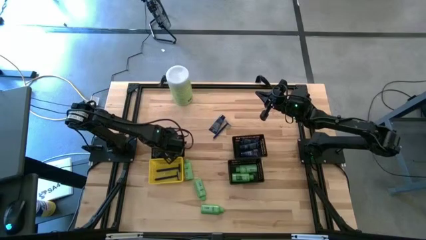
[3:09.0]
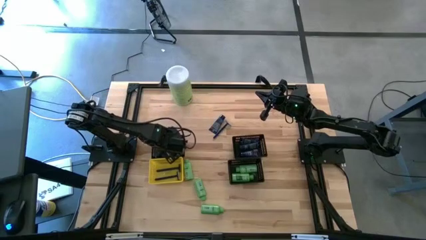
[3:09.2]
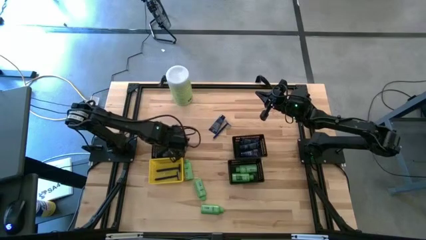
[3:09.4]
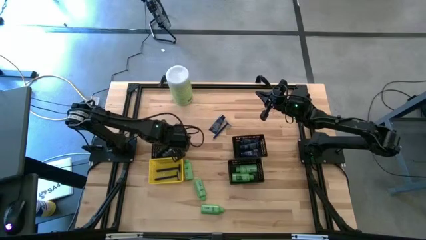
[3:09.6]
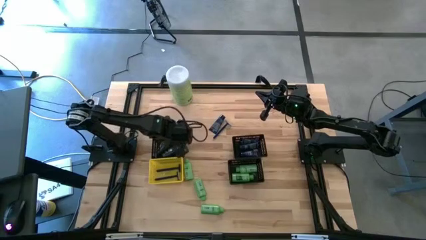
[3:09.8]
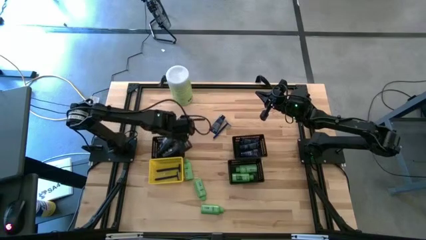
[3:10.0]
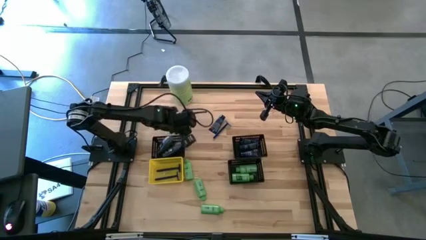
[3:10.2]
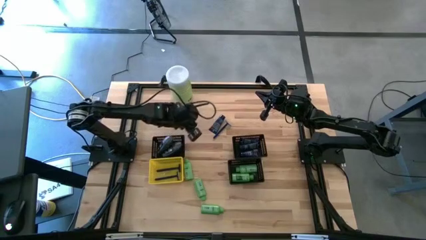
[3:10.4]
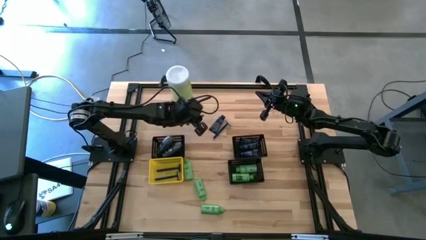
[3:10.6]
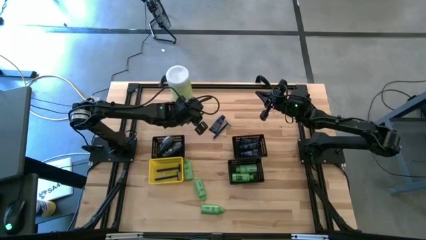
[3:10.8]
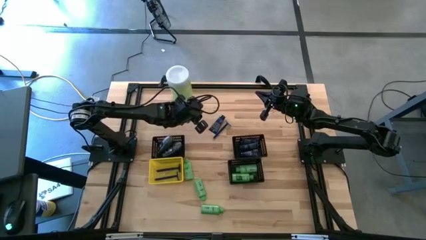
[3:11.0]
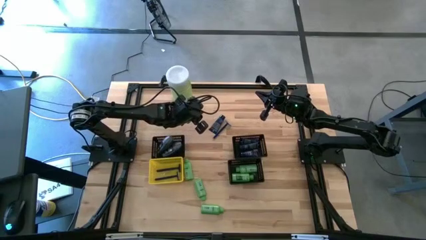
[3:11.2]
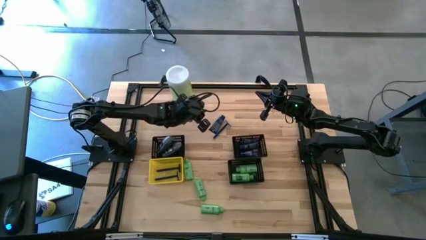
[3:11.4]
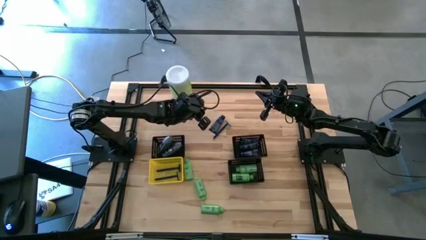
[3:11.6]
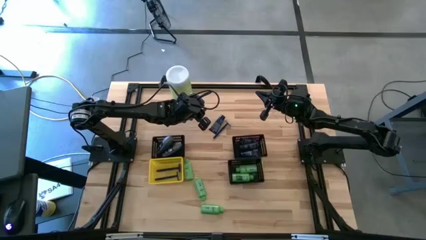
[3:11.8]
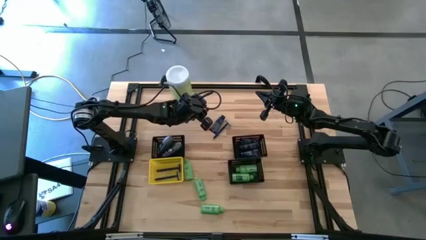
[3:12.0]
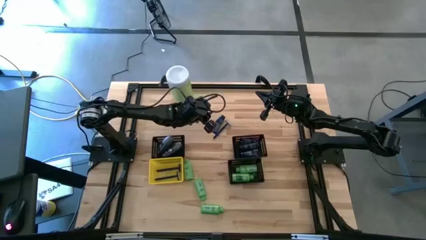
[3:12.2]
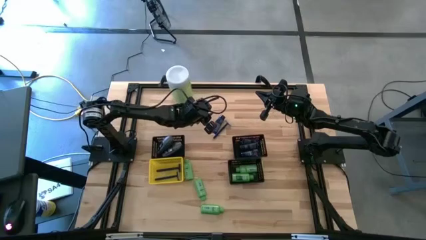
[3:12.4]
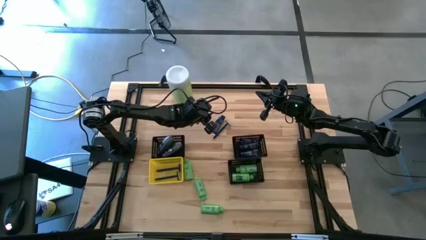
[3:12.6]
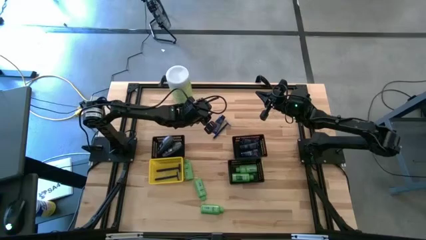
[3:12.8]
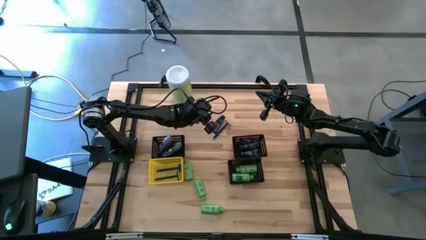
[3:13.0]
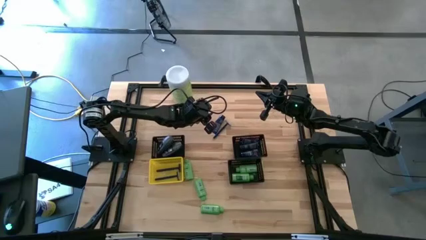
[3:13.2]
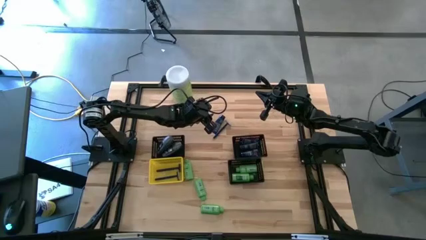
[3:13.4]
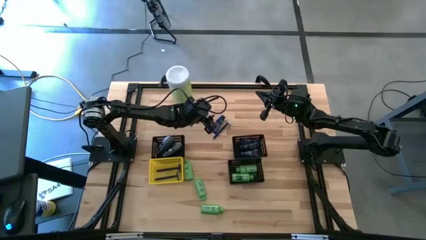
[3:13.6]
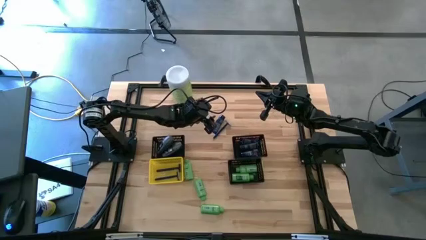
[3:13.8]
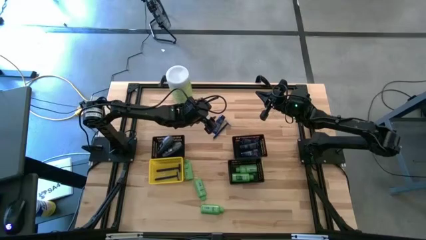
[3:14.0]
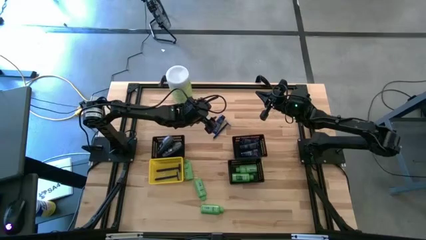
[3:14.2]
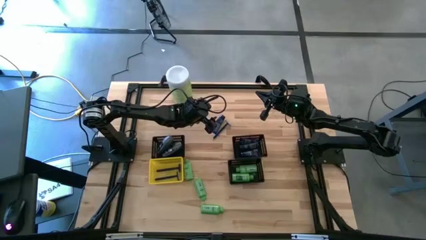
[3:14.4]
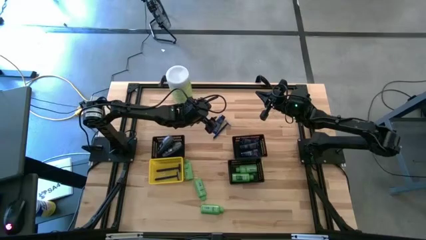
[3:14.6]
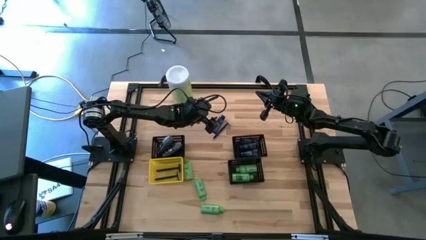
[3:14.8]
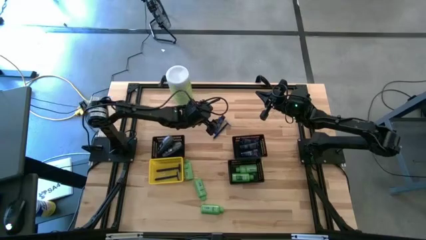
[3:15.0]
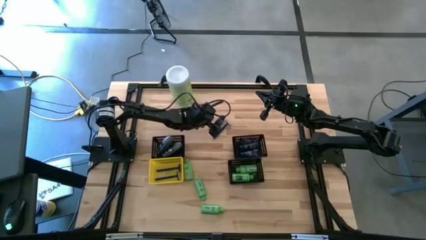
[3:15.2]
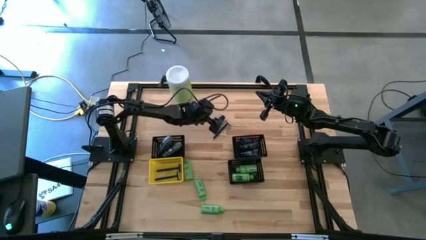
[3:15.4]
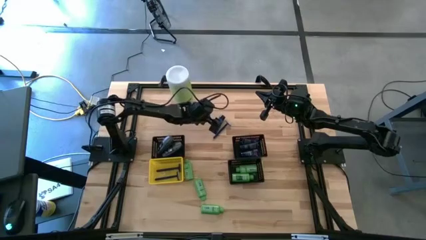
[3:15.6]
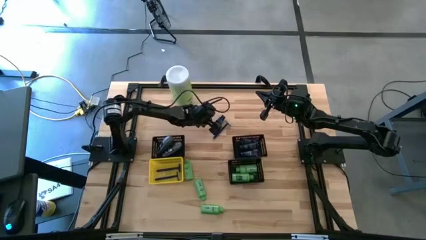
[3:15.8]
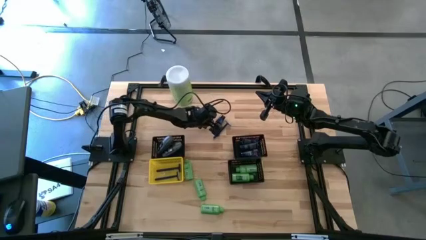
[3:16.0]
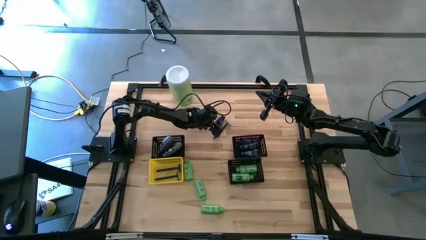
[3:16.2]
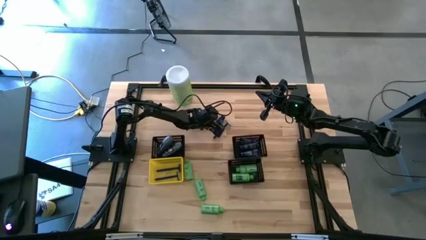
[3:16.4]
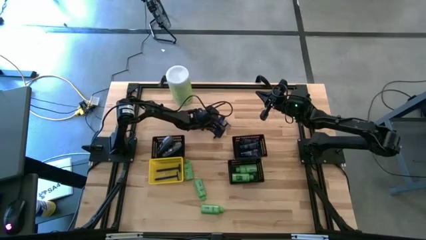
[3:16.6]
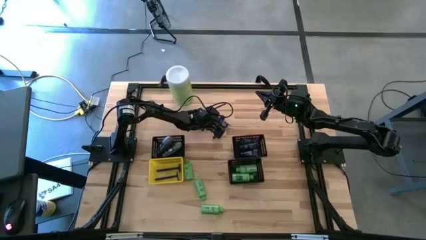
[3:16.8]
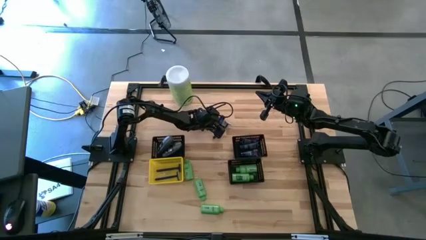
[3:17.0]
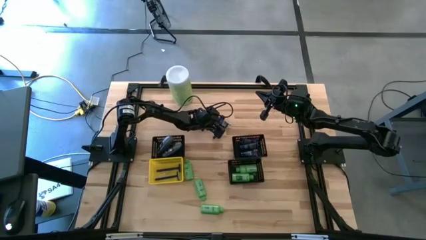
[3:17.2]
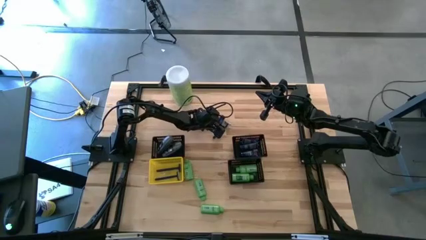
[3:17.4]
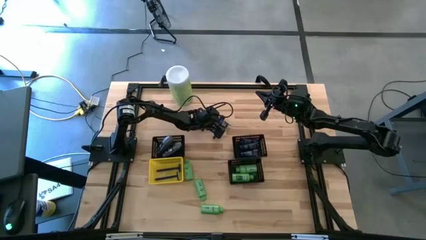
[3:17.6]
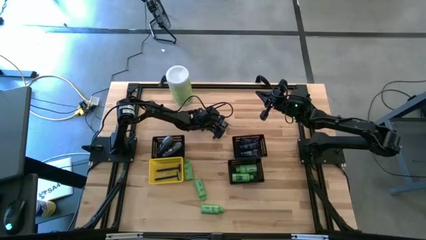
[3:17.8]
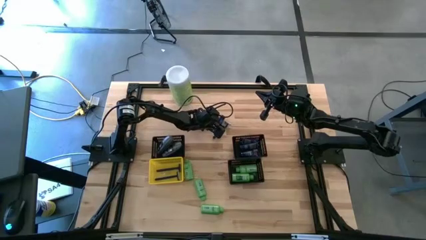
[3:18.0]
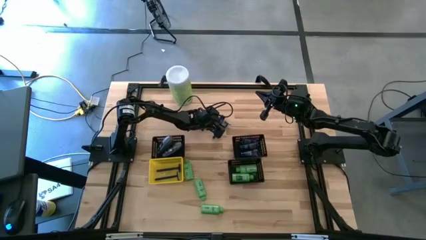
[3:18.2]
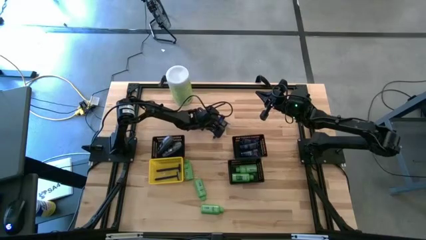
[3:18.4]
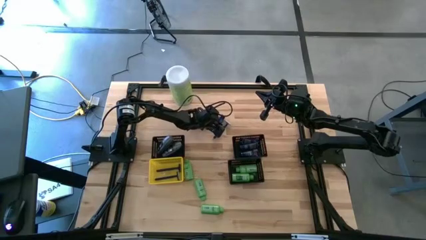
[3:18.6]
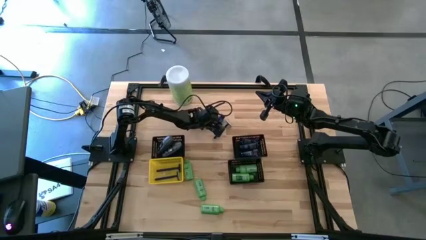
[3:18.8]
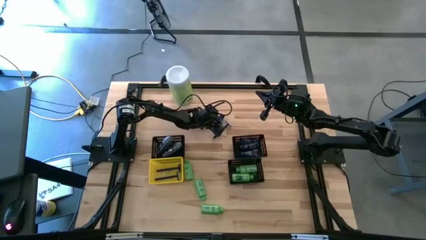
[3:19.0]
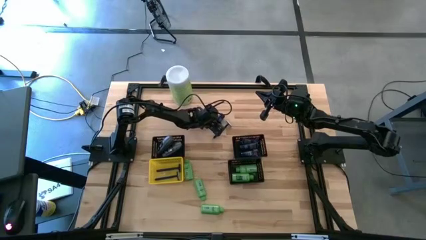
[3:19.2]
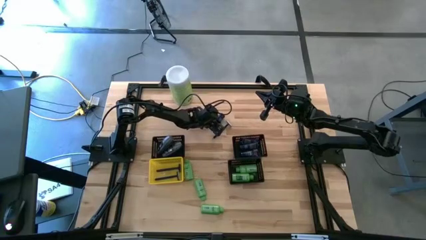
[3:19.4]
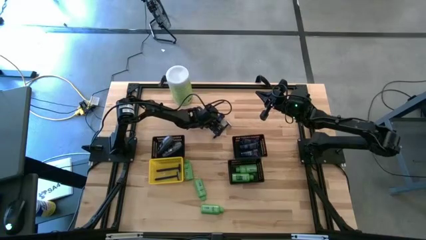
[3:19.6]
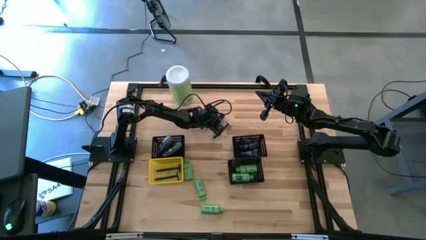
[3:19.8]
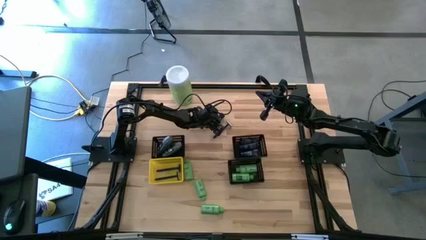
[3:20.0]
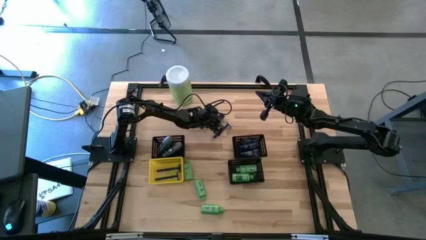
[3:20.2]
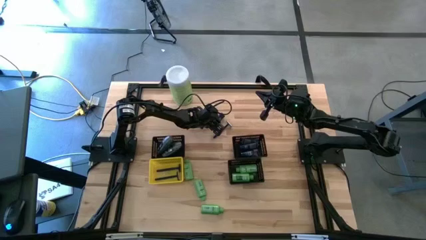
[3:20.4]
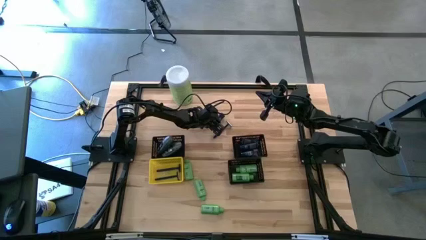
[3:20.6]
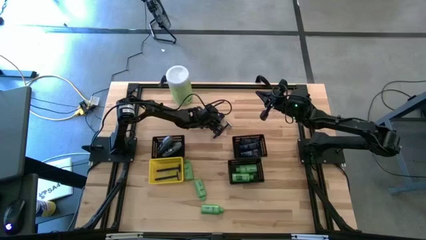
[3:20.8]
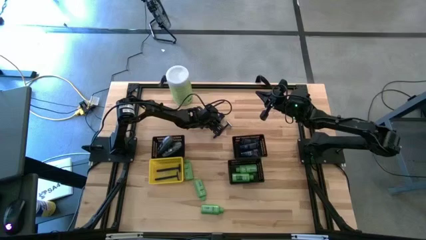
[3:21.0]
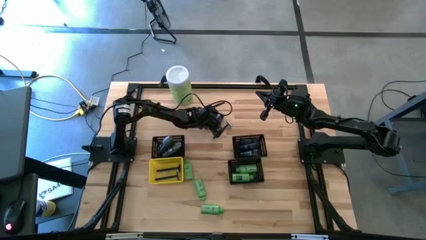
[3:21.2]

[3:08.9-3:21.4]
Task: Pick & Place Travel size toiletries
Put the blue shave cream tub into the top right black bin
